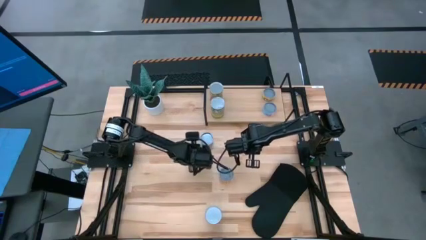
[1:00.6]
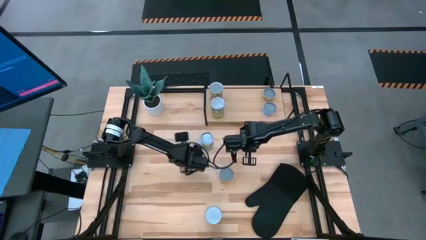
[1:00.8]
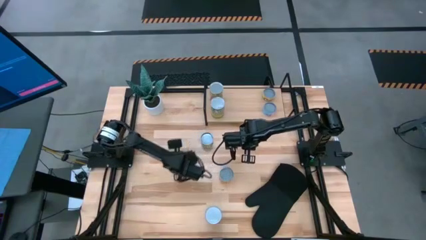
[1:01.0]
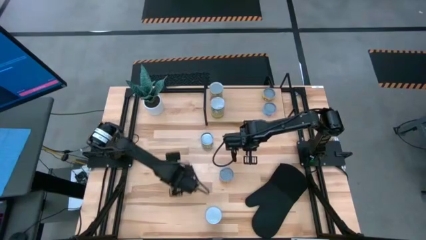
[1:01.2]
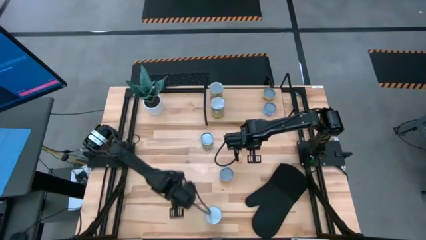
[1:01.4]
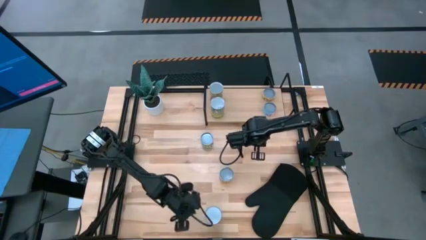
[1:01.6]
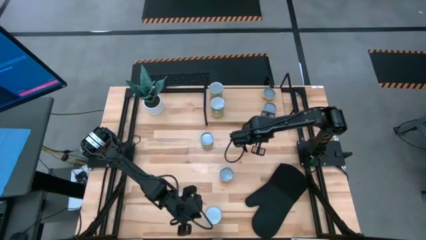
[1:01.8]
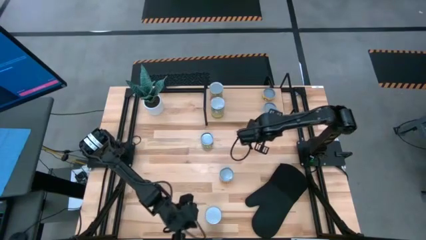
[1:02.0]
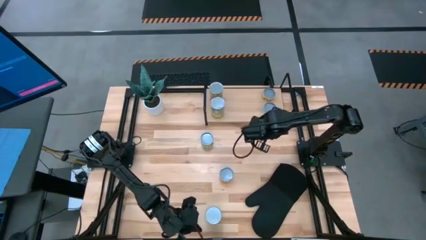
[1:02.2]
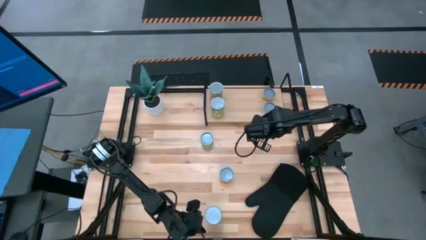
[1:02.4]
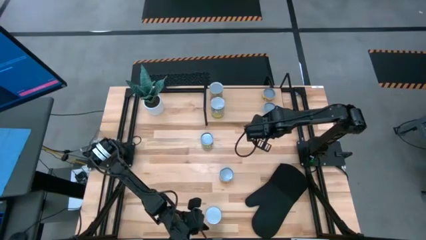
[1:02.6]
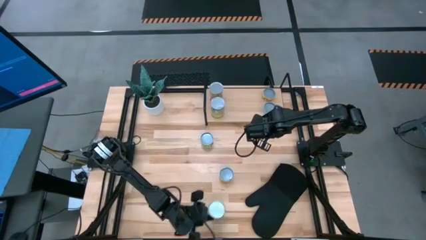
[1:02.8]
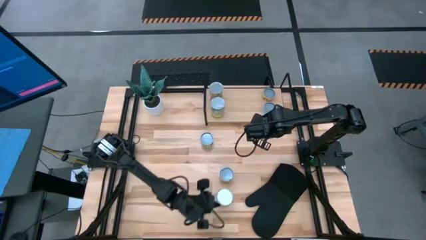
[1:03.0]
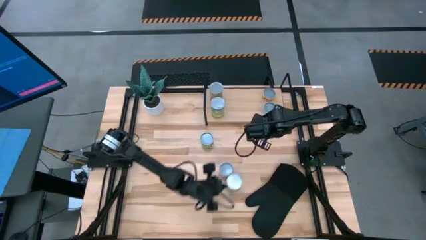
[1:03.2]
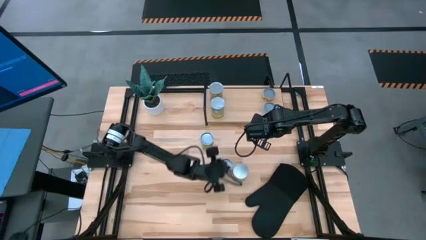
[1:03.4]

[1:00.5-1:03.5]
Task: Pick and place cans onto a shelf
Move the canned peas to the center of the table

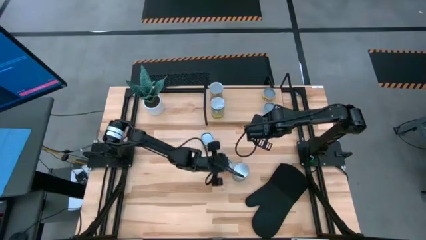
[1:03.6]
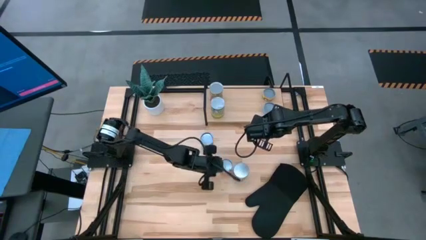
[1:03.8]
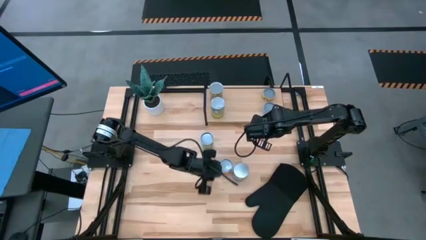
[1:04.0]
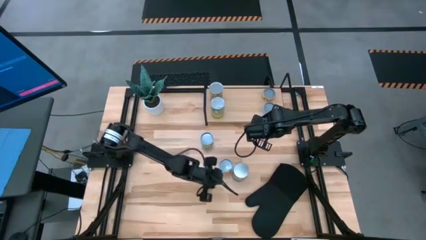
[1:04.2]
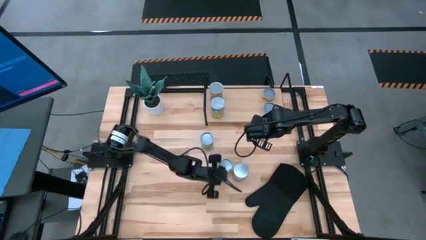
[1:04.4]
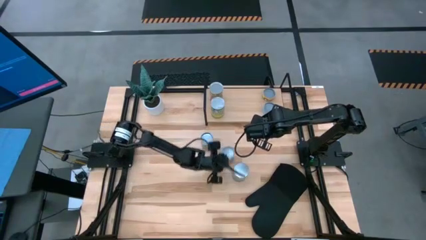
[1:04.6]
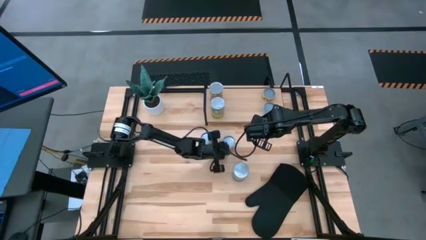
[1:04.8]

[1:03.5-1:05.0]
Adjust the canned black beans in the table

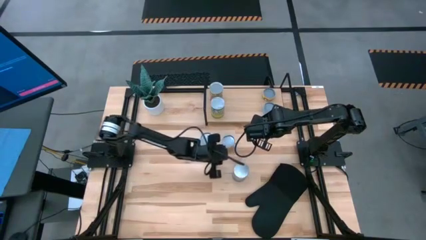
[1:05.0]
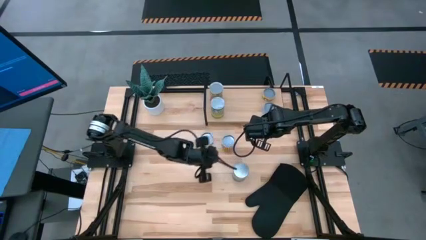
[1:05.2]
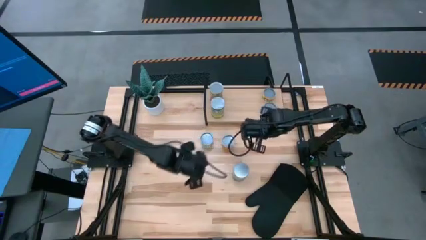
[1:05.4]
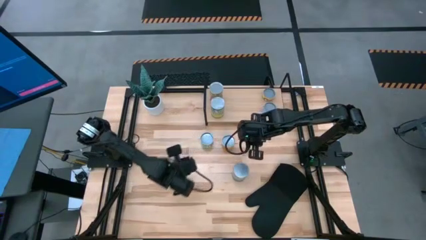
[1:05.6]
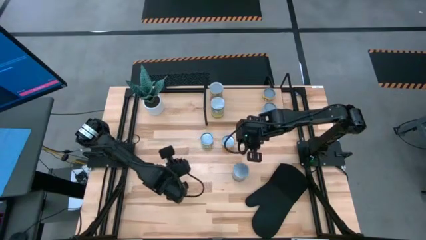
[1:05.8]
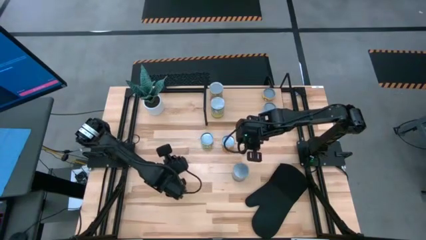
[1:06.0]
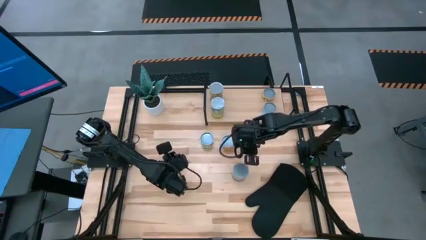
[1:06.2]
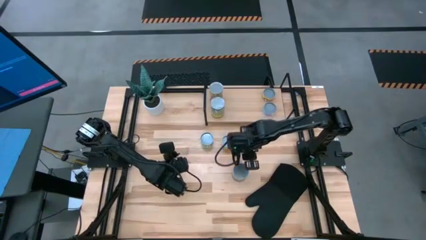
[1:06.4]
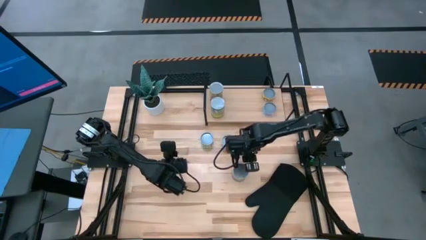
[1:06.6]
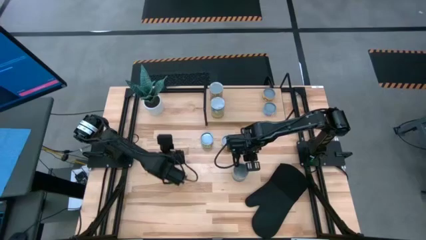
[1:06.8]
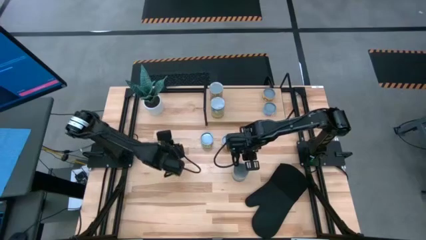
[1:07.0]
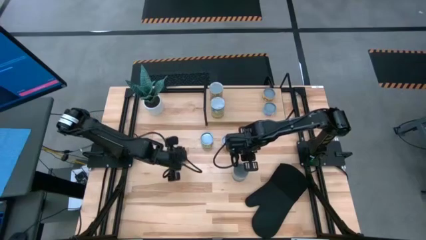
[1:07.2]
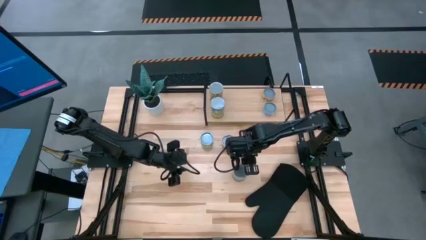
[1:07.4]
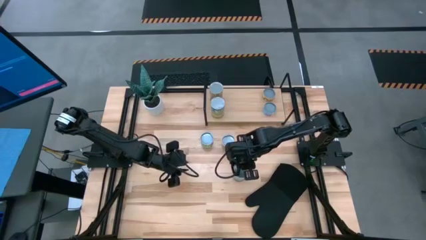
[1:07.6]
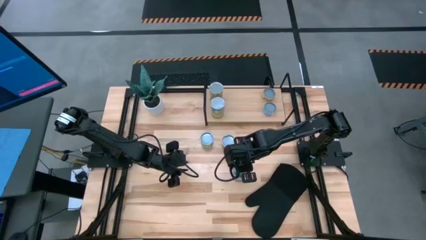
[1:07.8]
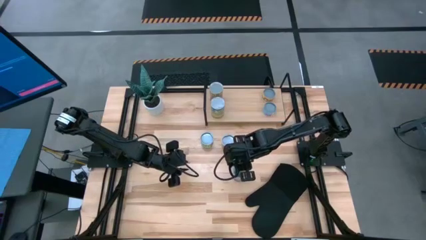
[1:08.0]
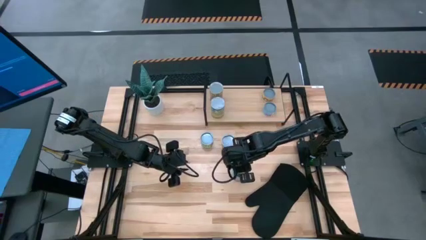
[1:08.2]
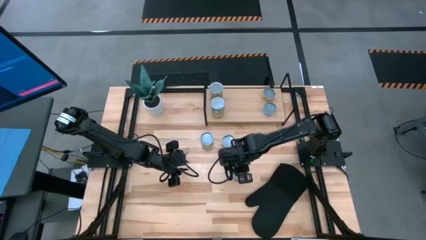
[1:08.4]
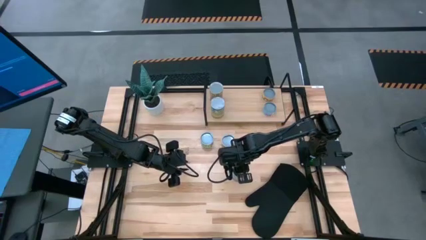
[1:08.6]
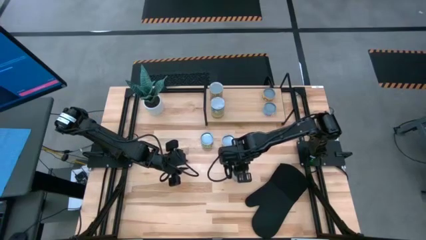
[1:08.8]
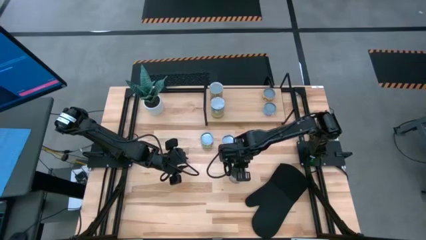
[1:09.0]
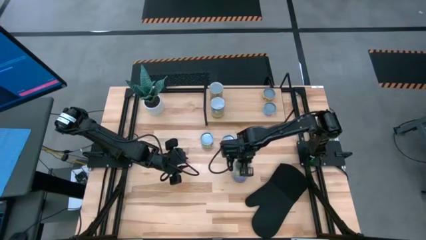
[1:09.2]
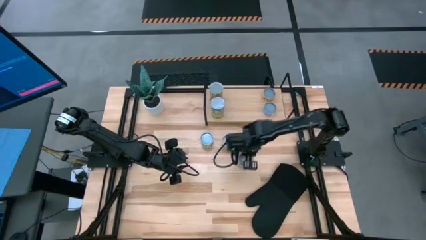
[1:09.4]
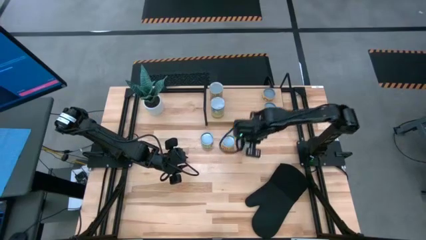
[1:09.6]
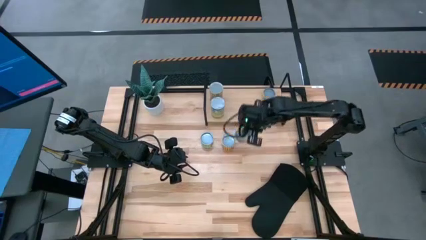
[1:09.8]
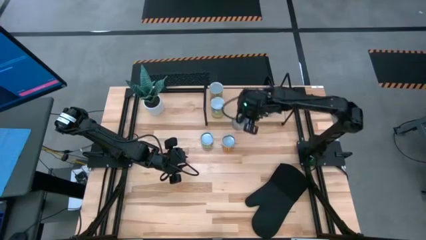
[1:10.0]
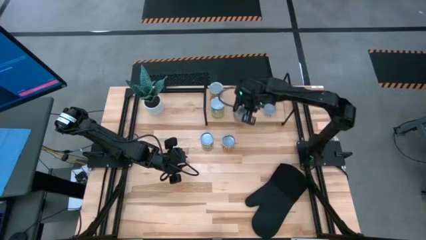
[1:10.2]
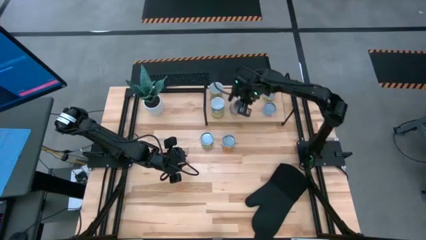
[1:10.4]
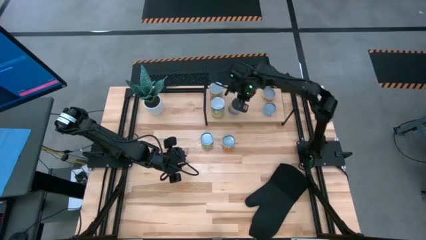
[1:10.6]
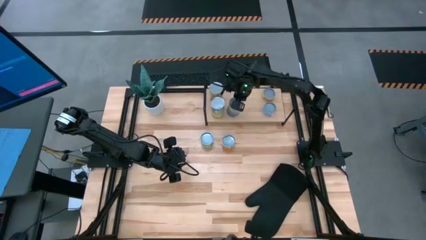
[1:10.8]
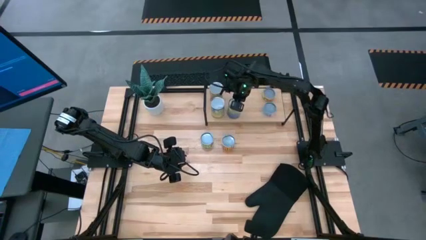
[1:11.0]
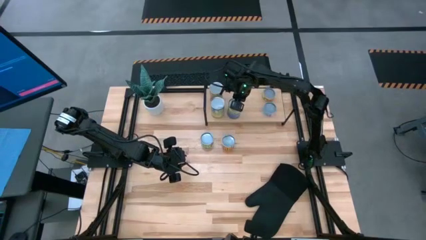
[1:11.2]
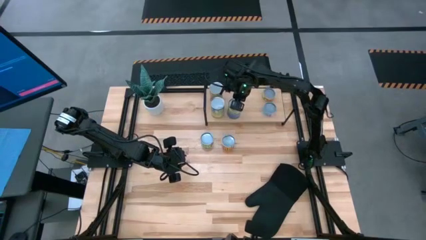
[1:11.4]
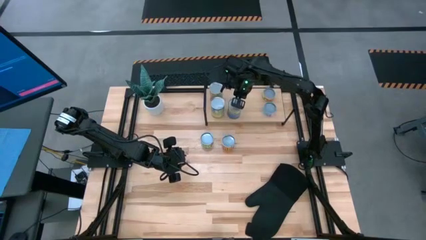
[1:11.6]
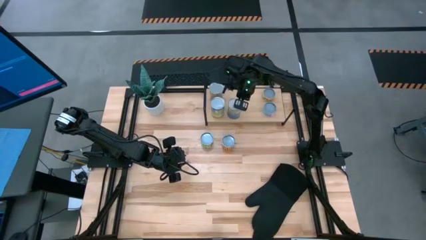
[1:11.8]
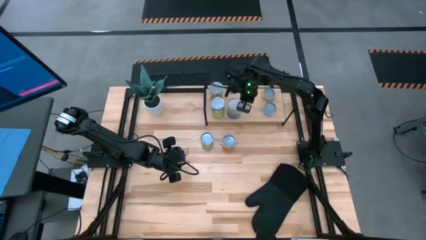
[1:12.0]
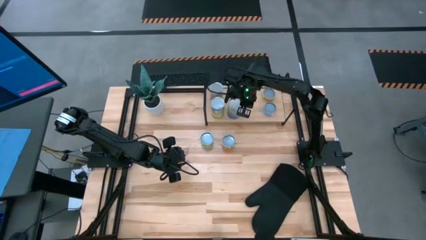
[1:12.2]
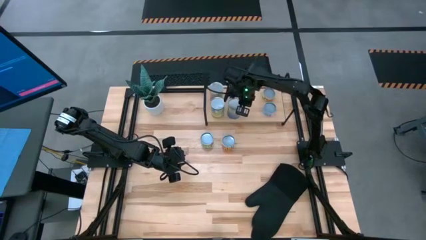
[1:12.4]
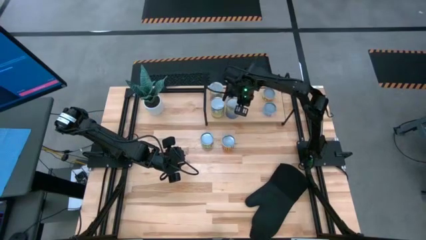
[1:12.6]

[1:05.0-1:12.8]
Put the canned peas on the shelf
